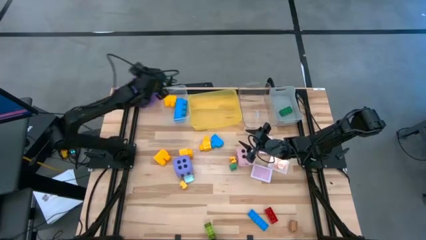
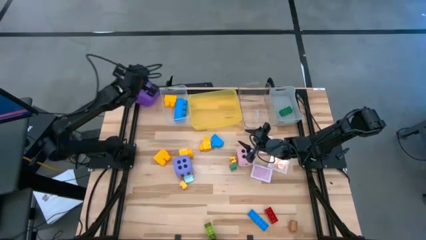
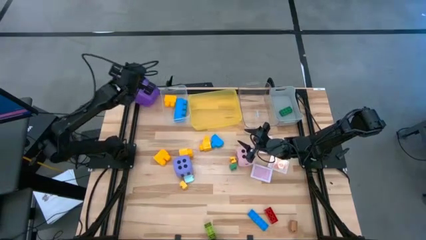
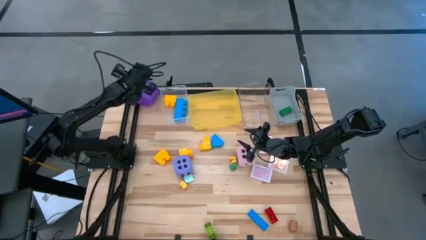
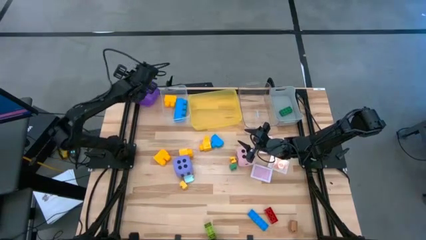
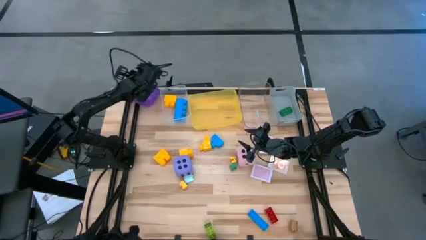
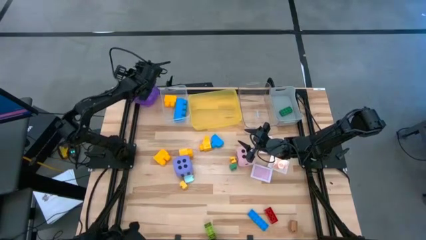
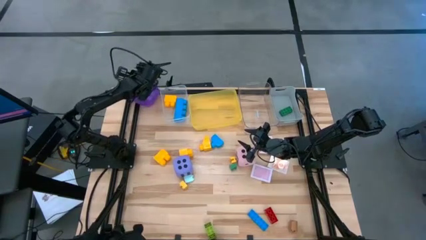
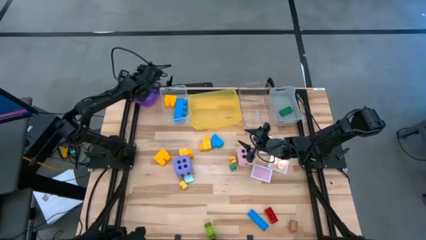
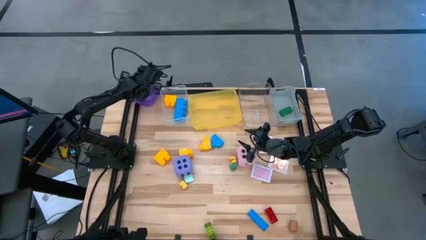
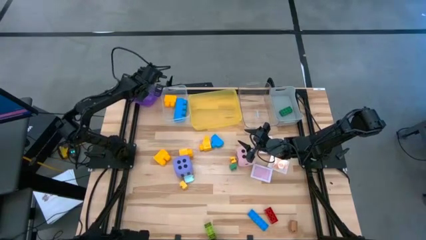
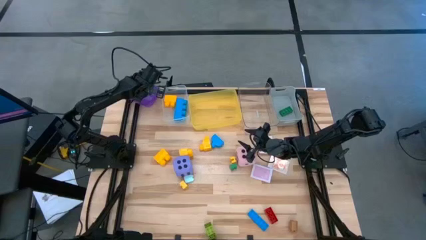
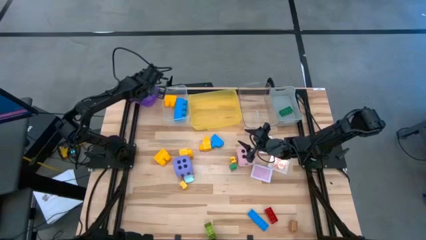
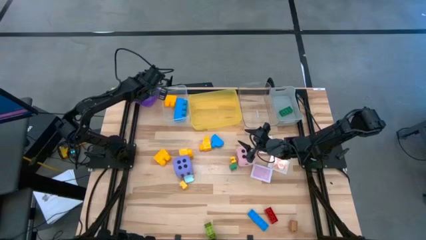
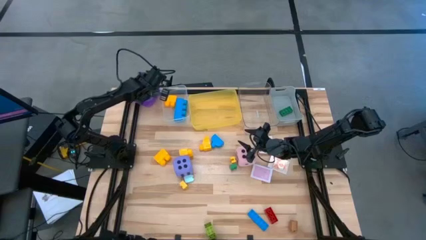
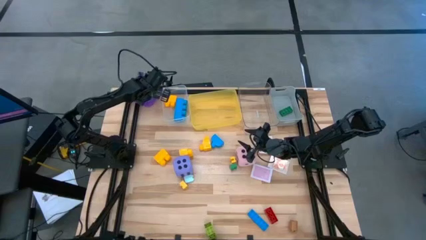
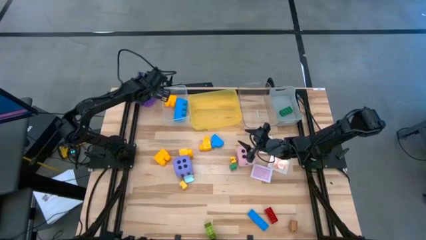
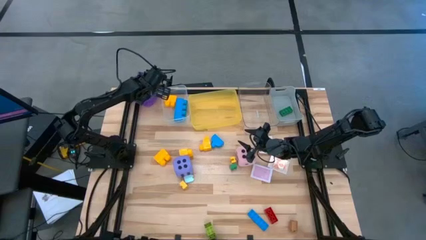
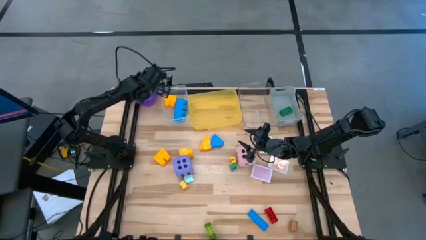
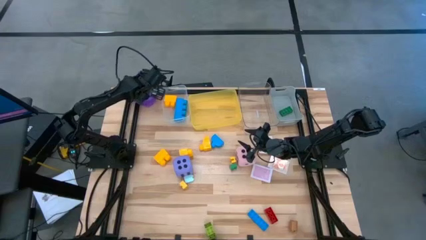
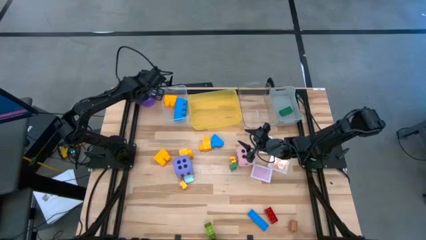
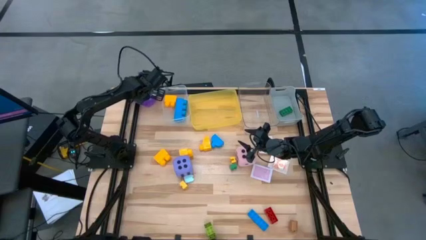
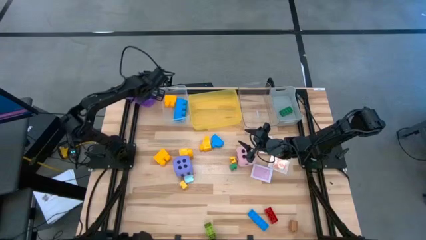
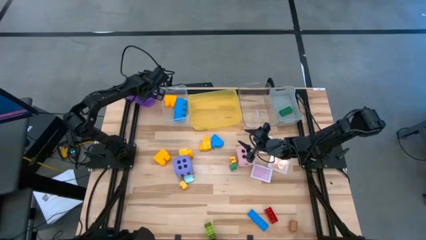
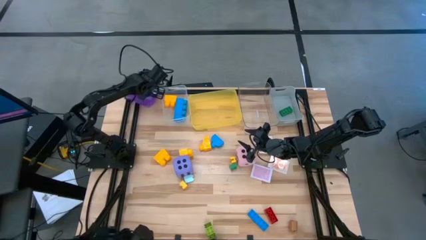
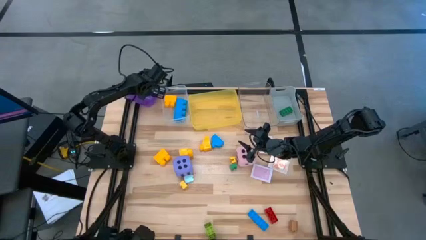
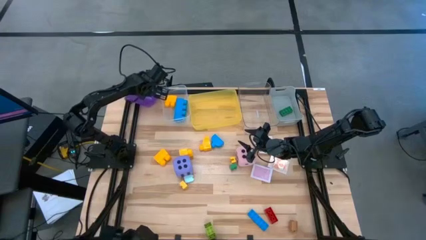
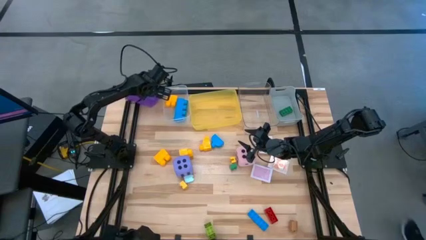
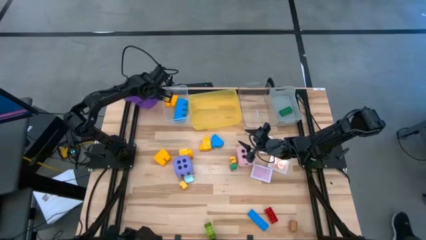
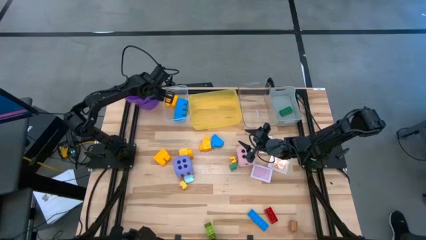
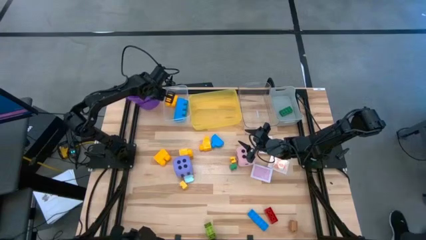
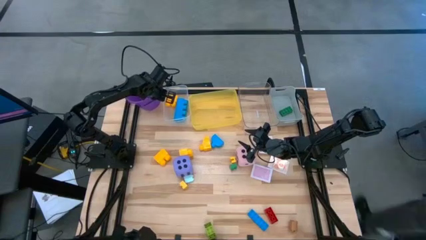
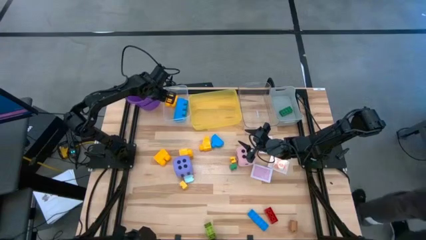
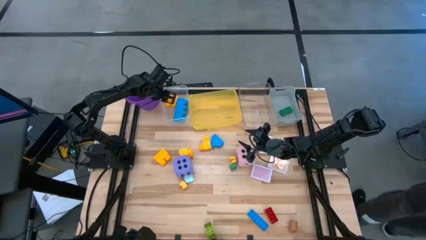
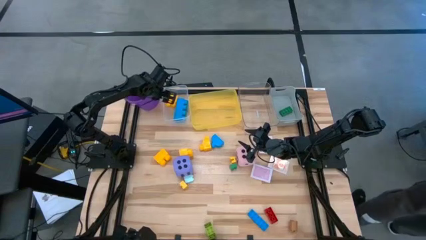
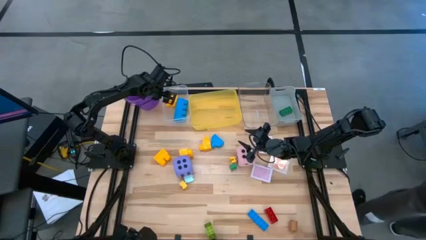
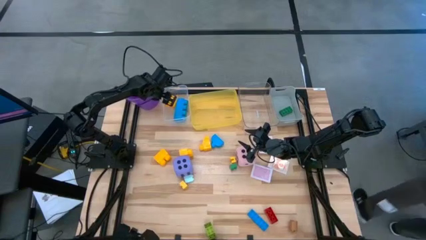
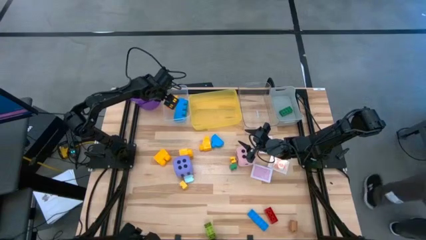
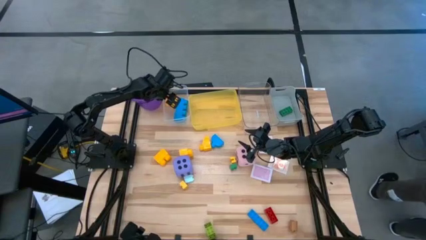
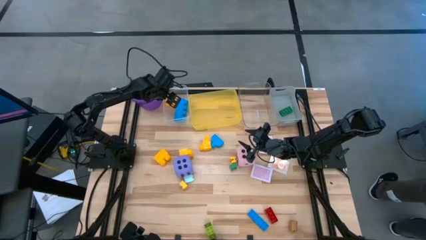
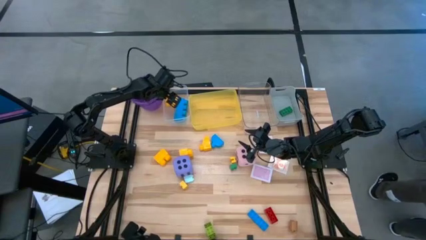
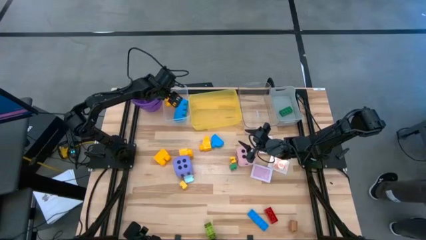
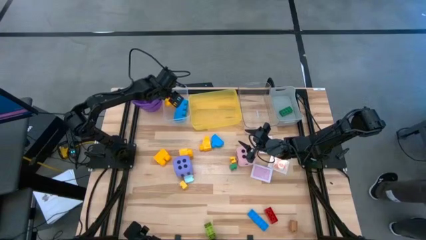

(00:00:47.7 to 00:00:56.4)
Task: Pick & Place Toys
Adjust the violet bucket

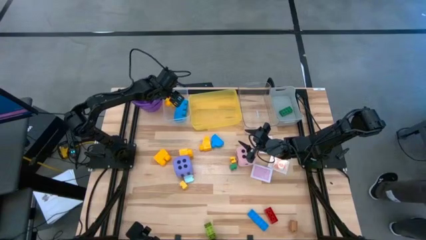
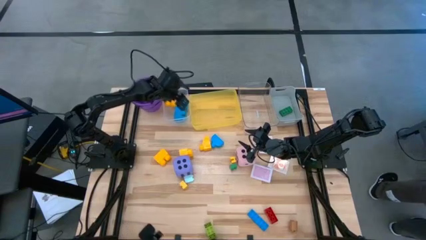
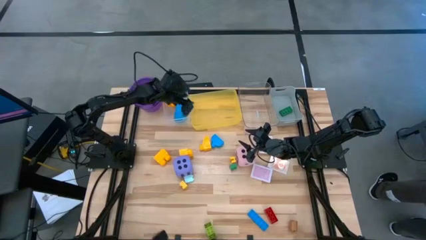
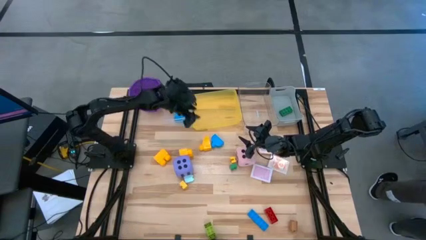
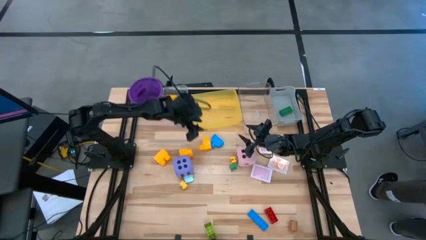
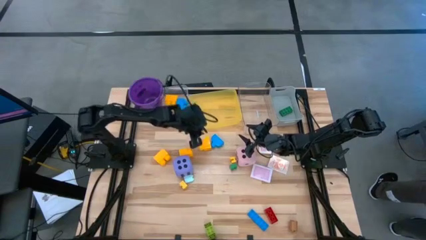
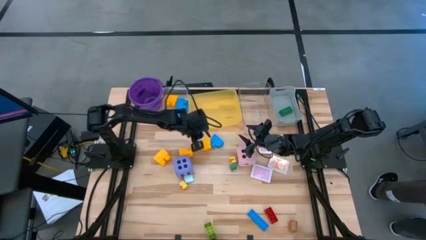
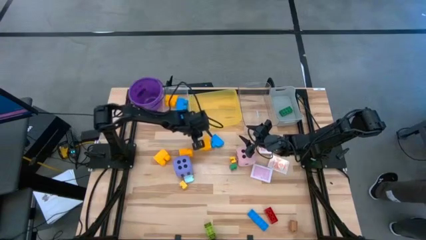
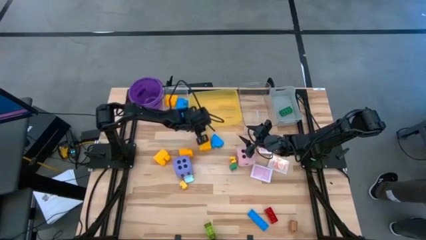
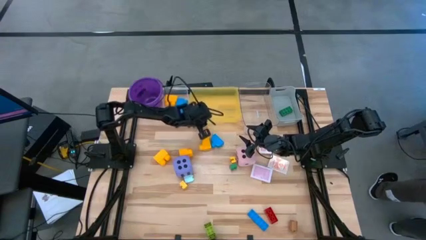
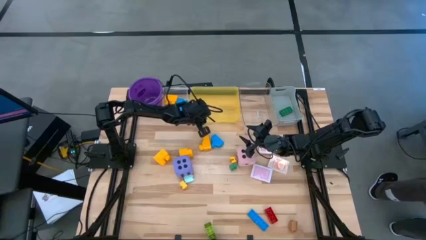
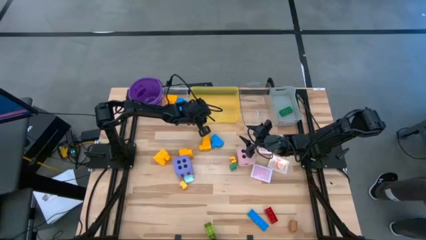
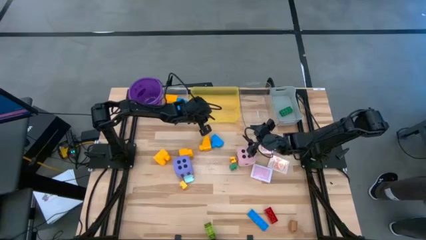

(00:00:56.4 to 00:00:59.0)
Adjust the yellow transparent bin

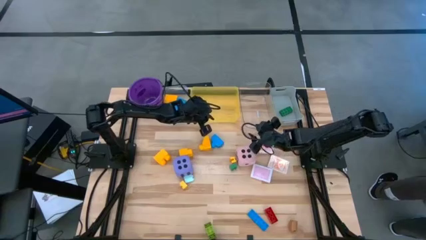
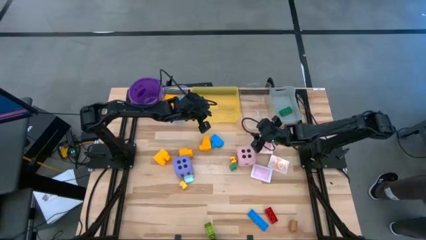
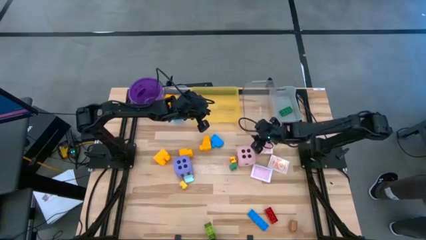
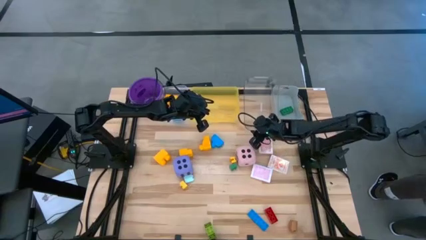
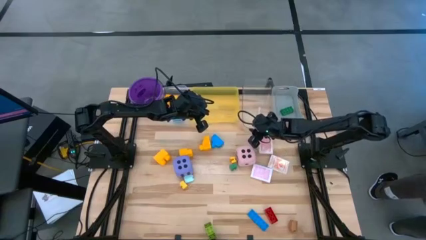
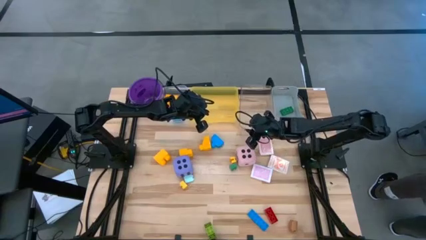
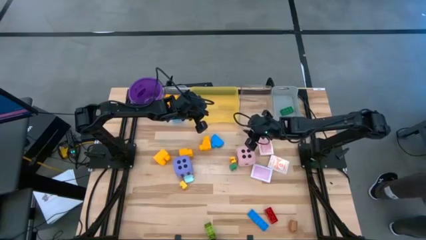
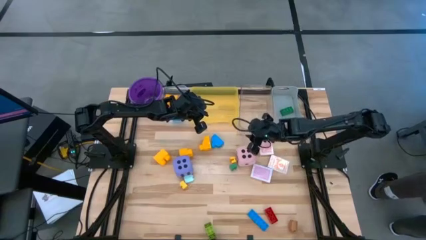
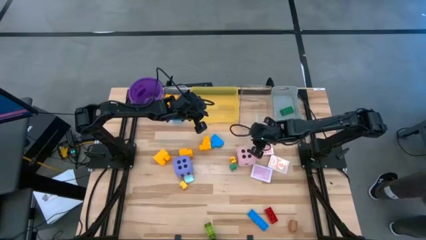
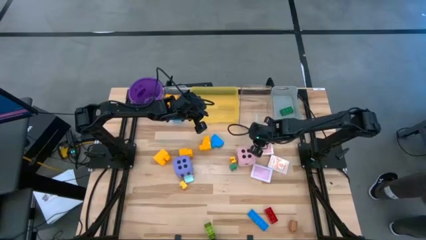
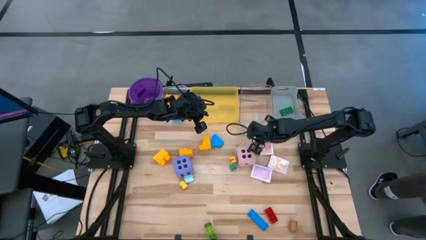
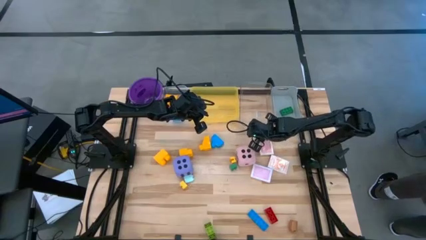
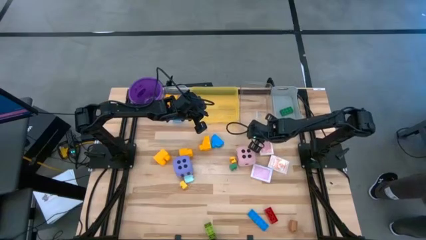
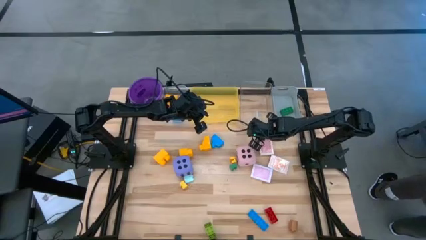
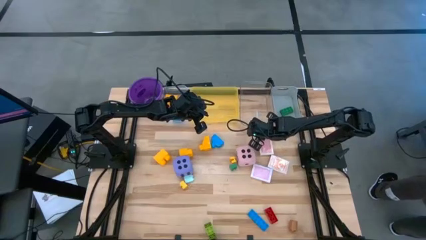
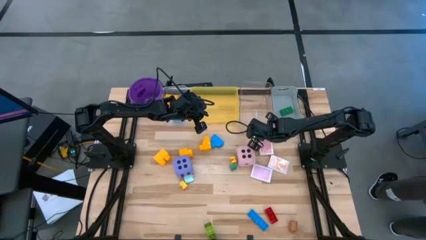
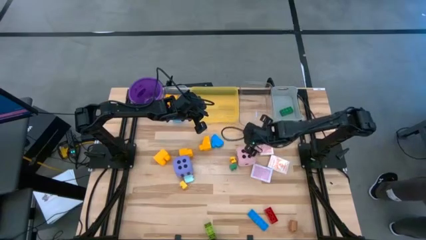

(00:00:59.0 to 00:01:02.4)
Adjust the transparent bin
